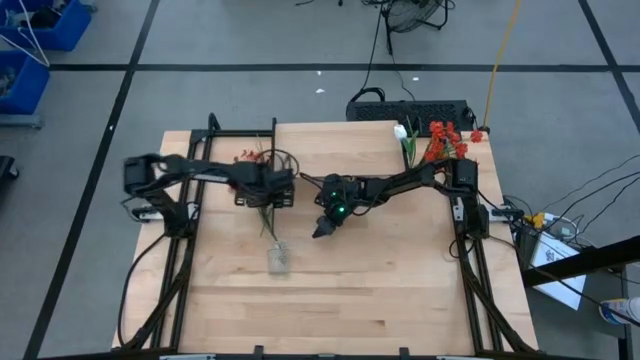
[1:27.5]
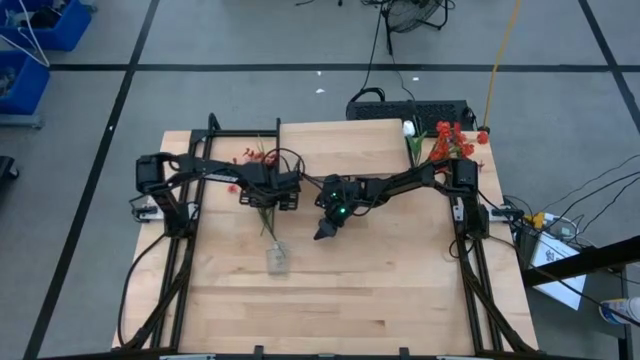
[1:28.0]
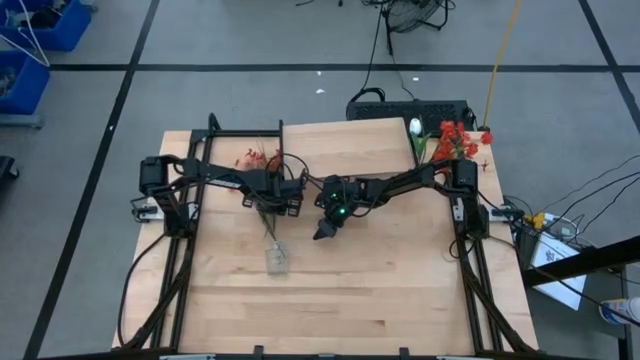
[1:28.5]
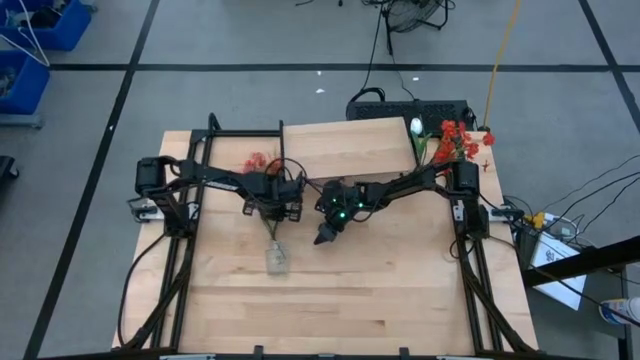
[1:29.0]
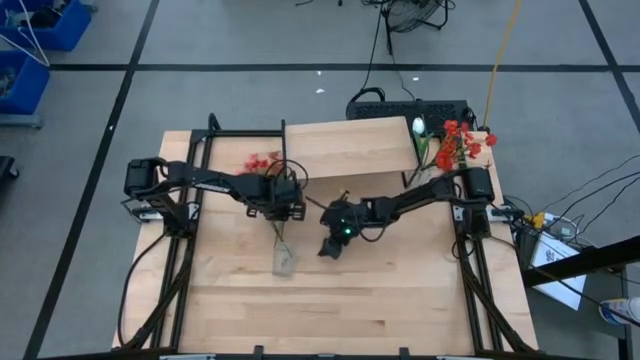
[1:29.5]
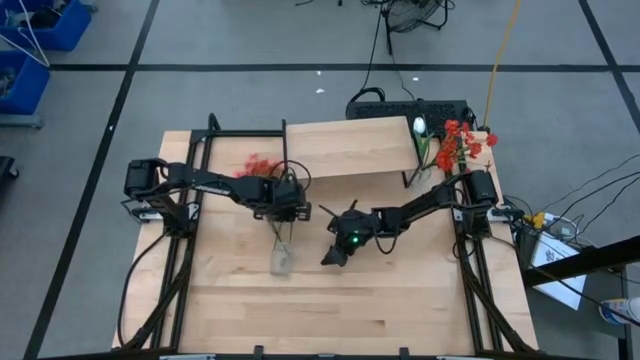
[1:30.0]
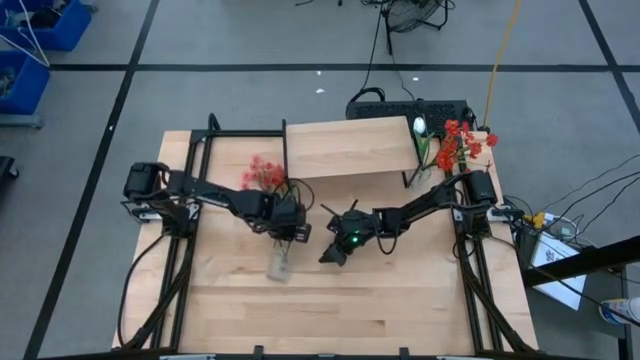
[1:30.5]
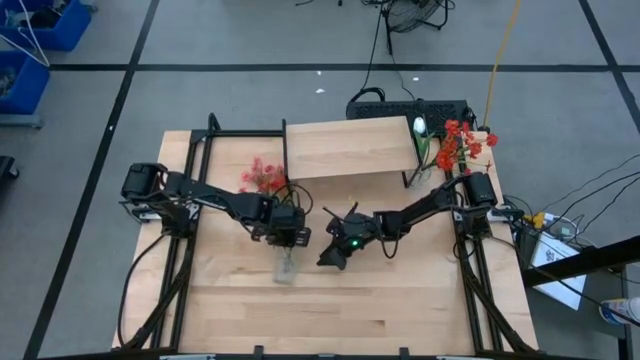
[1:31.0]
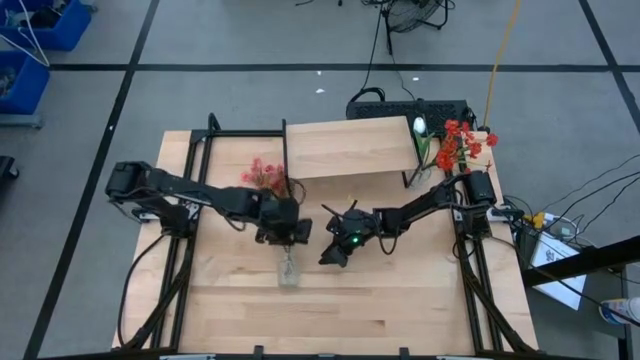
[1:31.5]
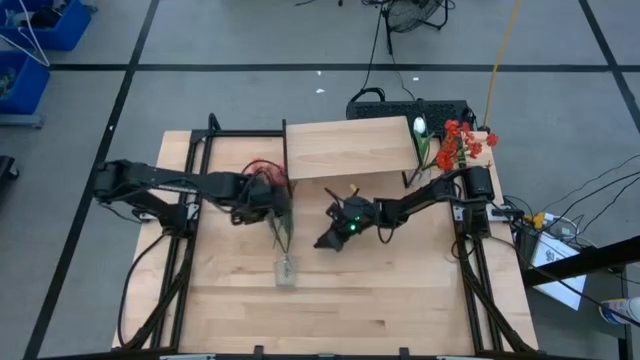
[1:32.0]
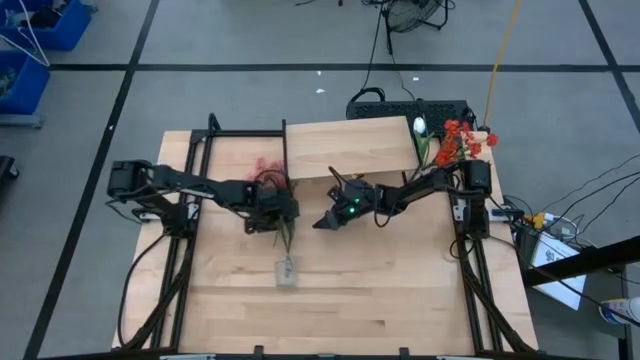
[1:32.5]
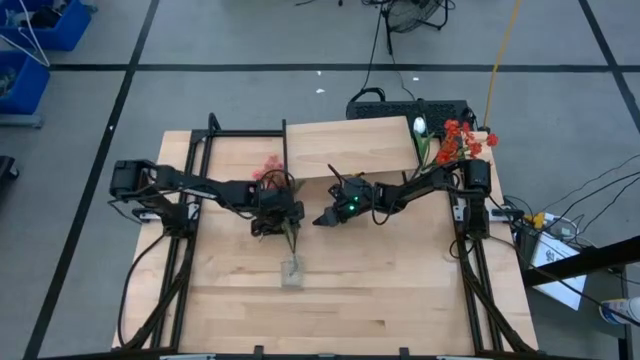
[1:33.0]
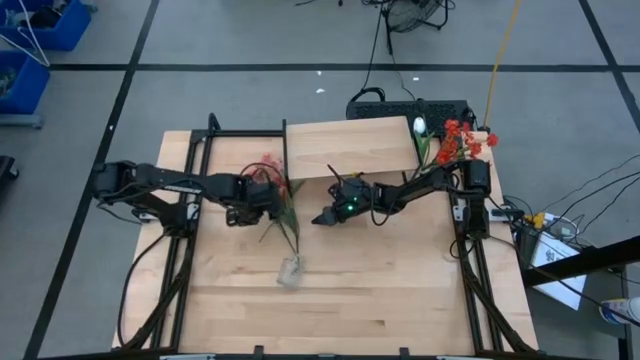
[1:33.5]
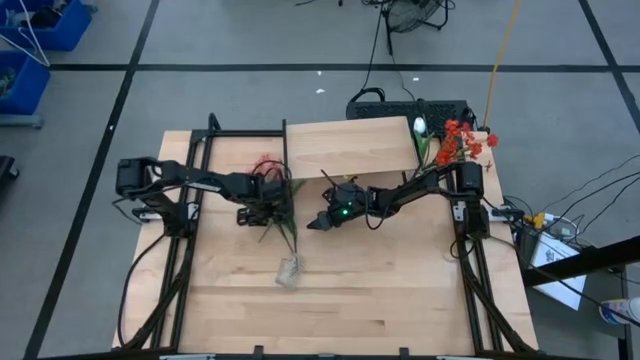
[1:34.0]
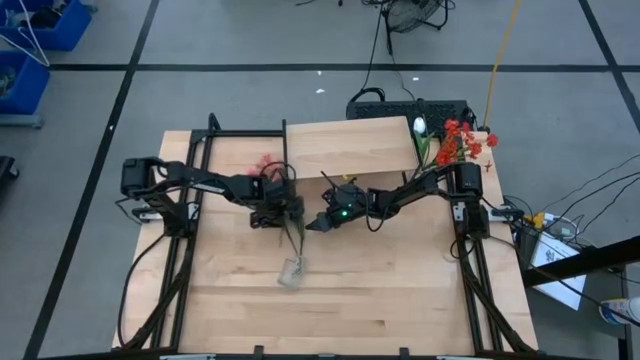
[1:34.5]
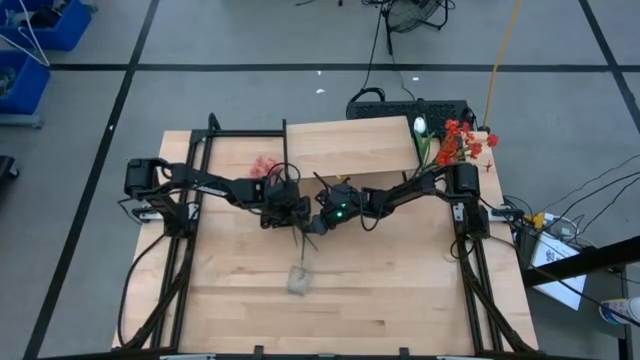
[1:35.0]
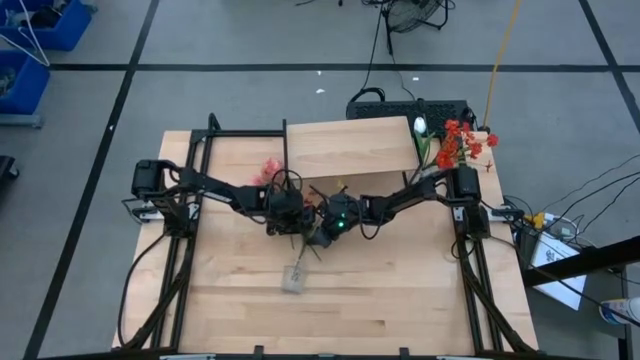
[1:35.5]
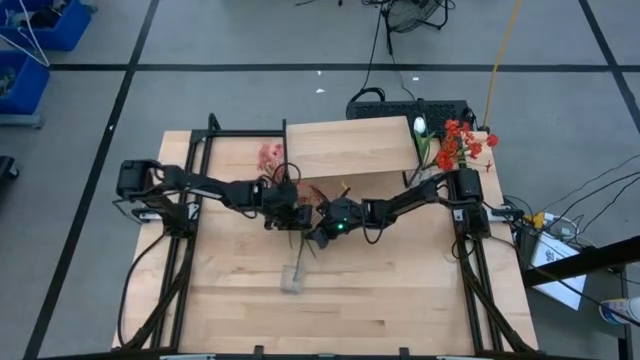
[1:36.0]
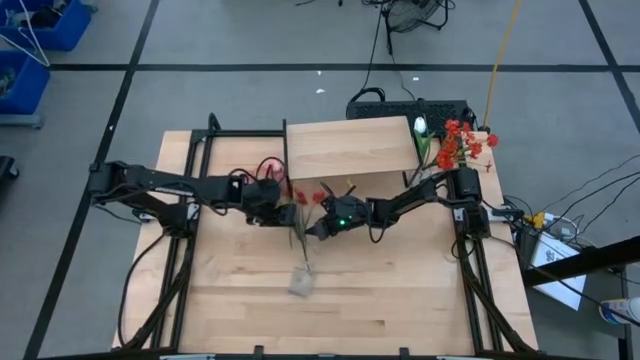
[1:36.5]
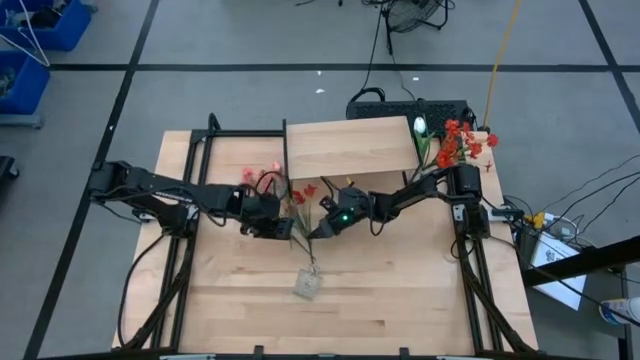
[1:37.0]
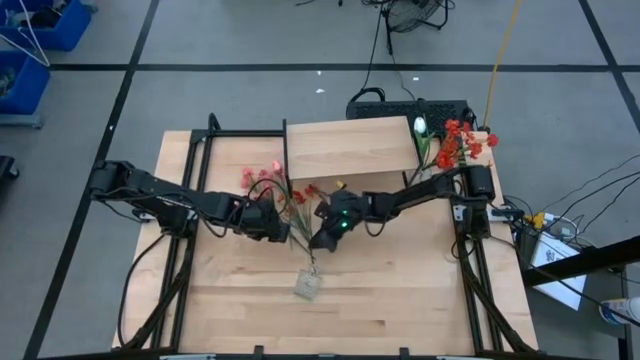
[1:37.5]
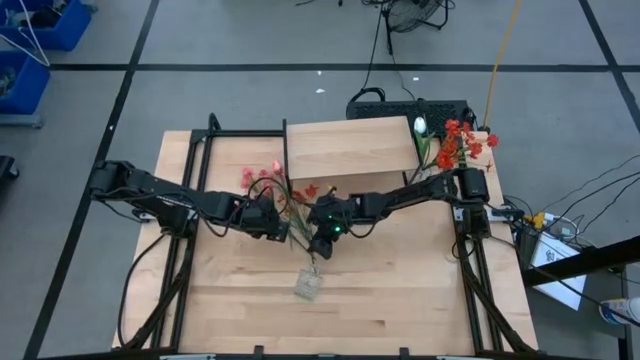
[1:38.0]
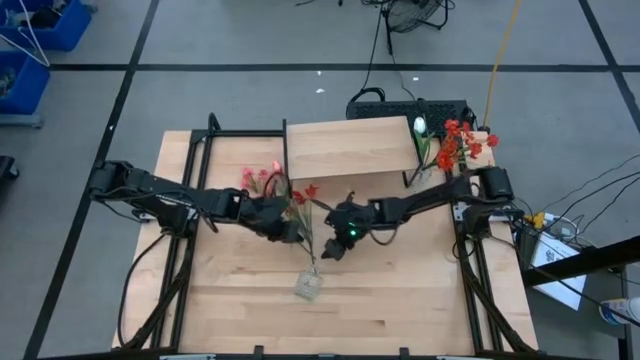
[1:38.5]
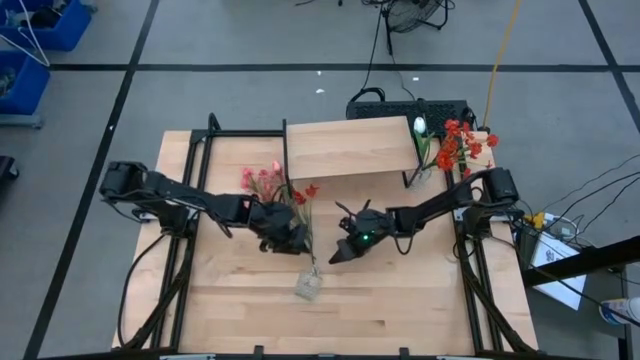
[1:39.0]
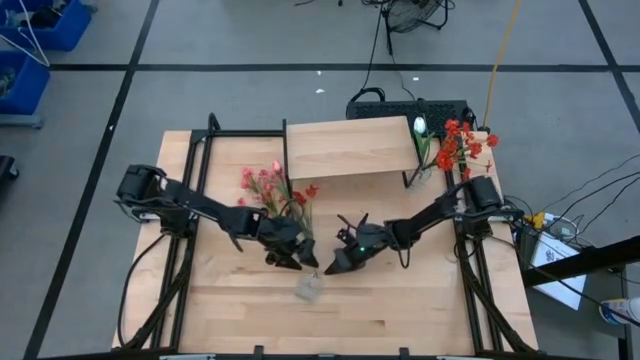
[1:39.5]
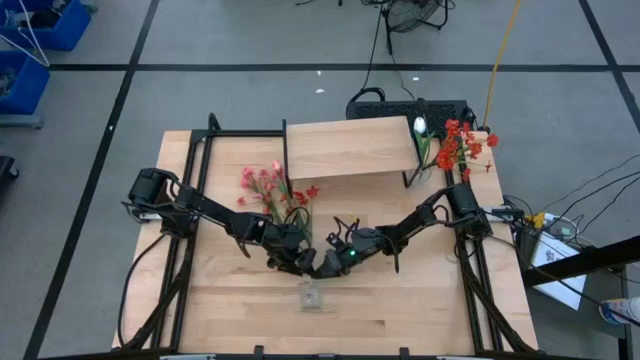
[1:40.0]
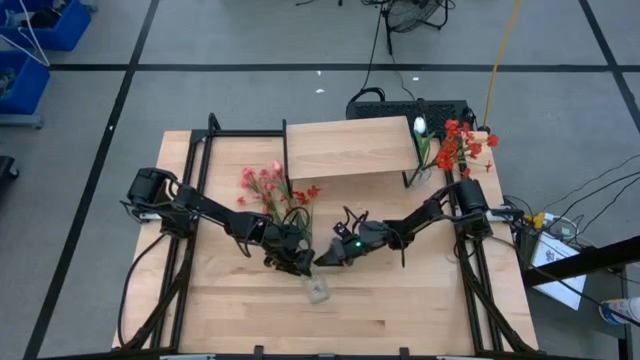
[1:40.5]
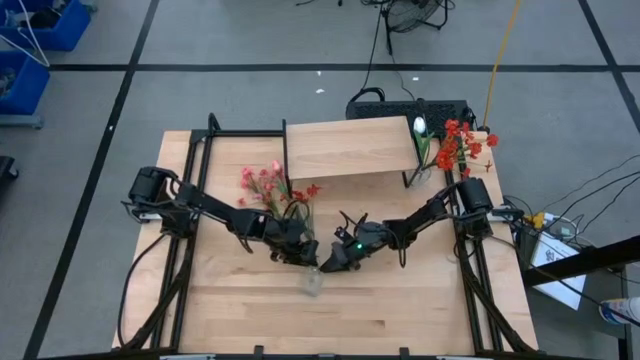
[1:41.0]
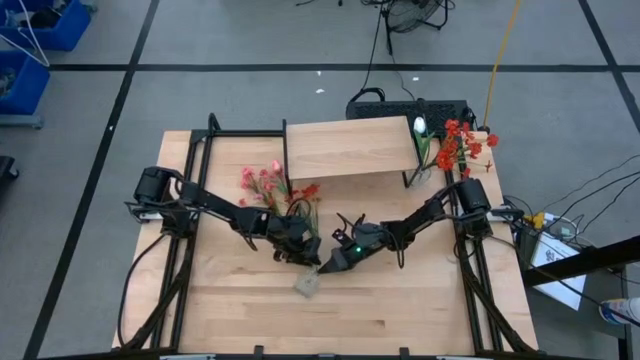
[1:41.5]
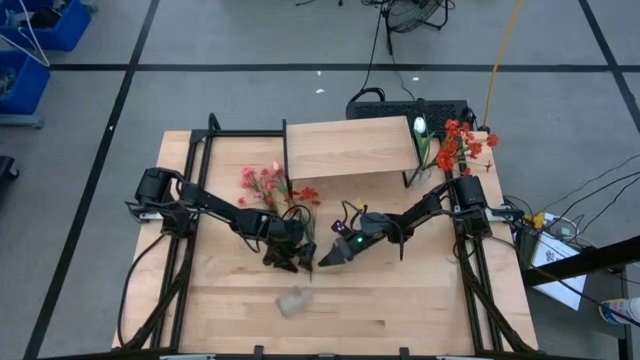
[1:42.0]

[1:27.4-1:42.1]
Task: Pick and place flowers into a vace then onto a shelf
Put the pink flowers into the left transparent vase

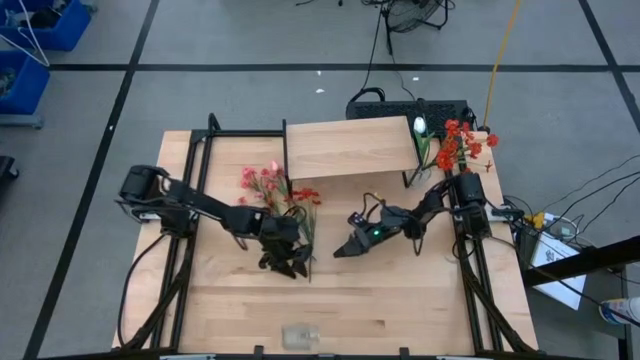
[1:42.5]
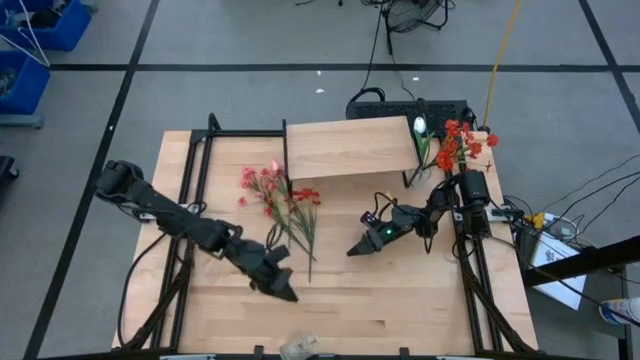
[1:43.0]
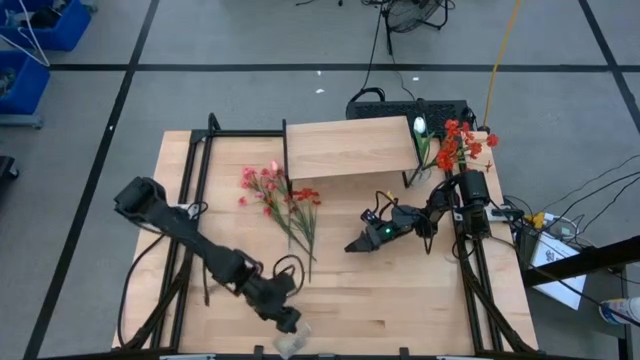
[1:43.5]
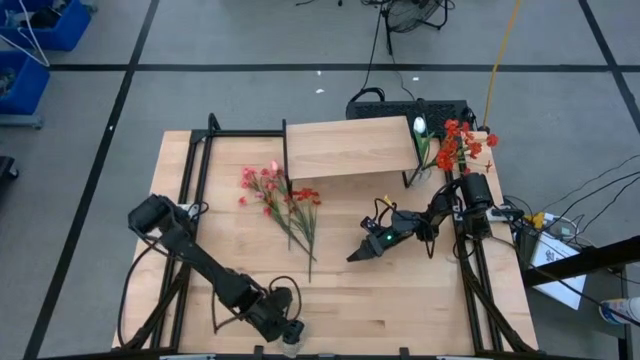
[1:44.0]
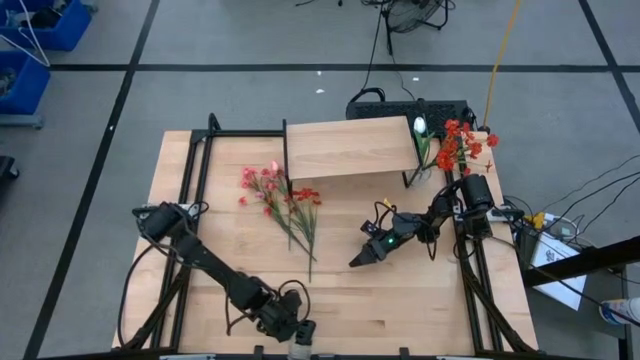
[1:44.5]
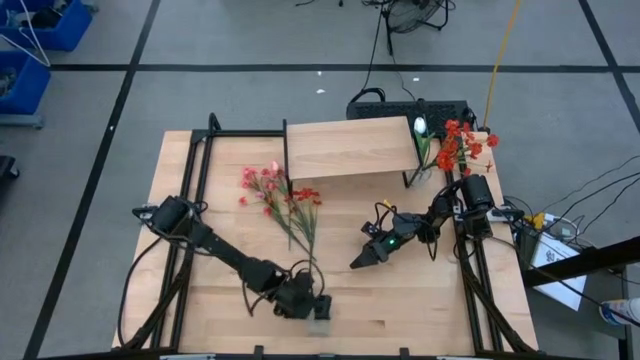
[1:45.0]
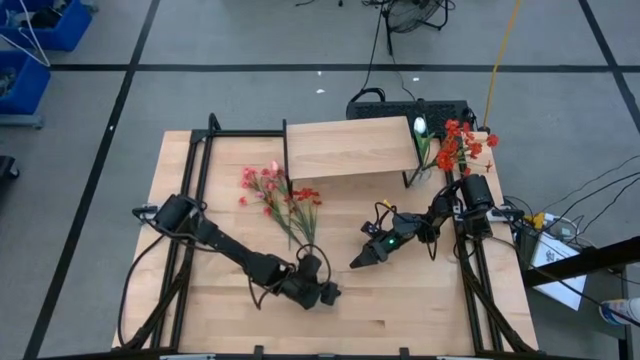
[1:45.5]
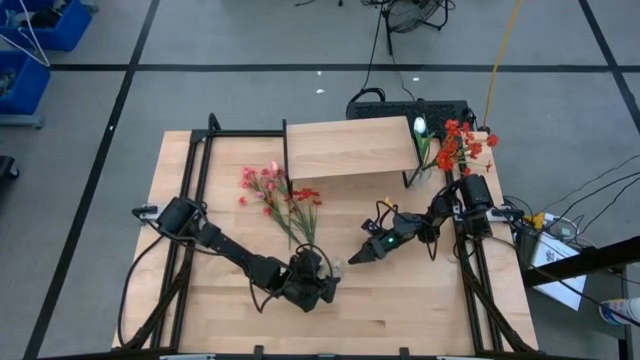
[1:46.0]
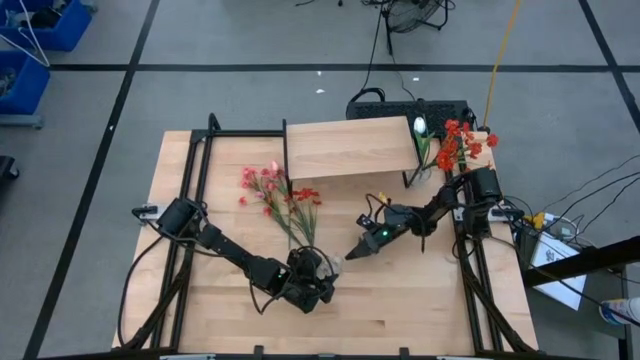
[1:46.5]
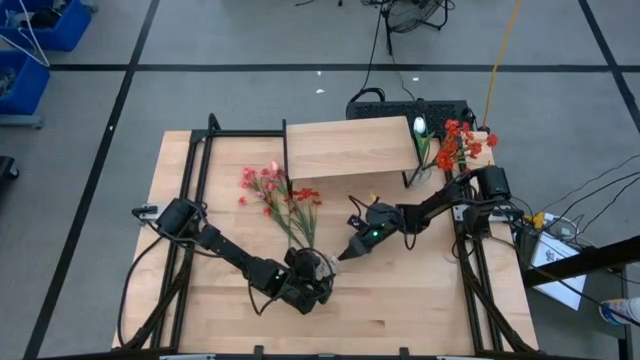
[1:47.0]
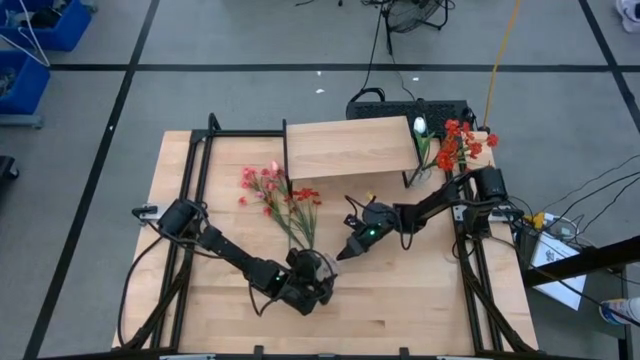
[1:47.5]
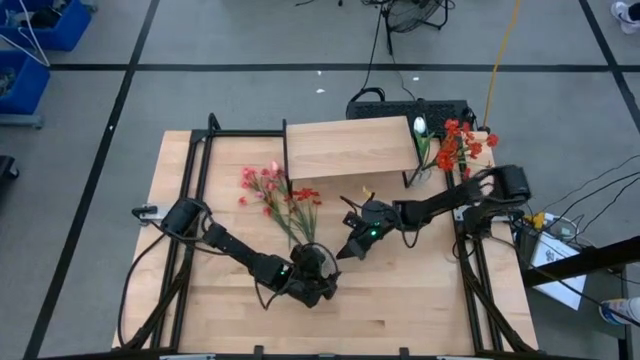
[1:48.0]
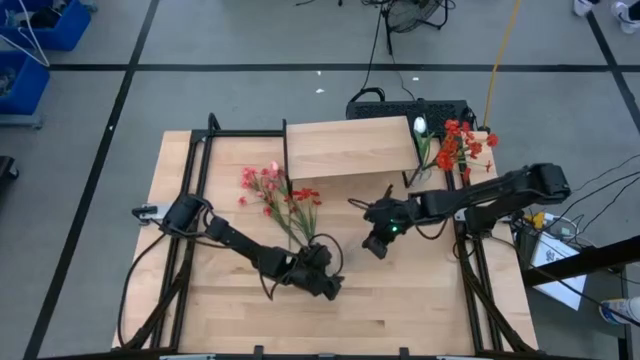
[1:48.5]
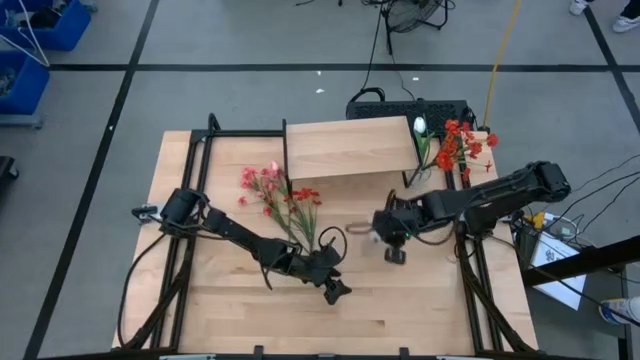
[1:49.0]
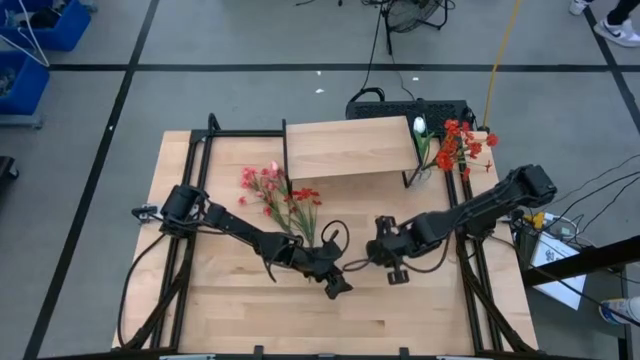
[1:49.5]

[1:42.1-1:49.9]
Adjust the bottom transparent vase
